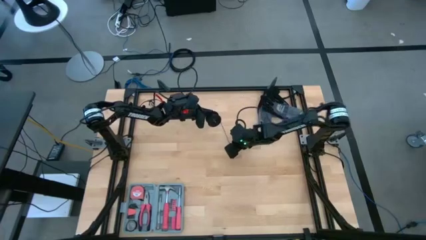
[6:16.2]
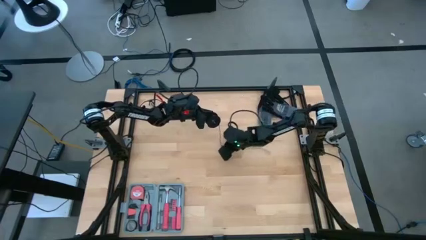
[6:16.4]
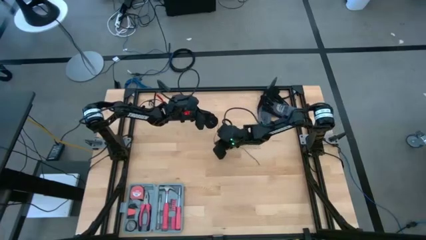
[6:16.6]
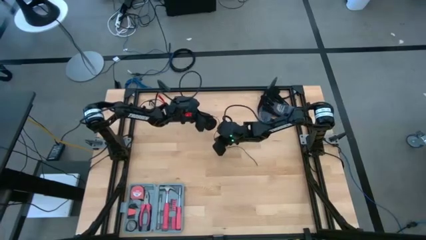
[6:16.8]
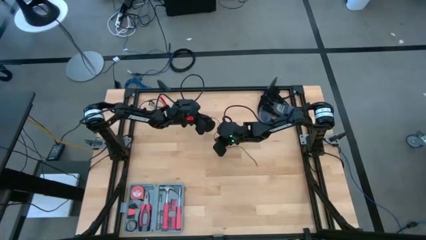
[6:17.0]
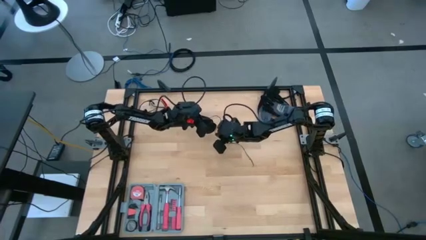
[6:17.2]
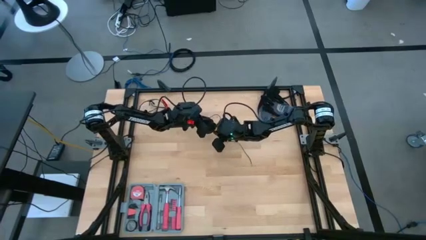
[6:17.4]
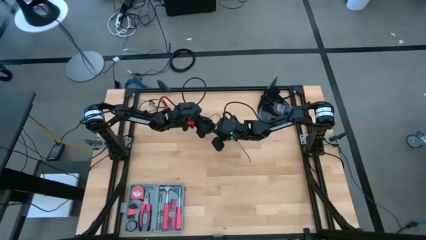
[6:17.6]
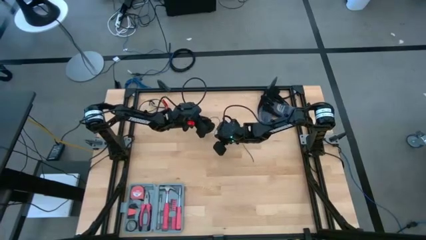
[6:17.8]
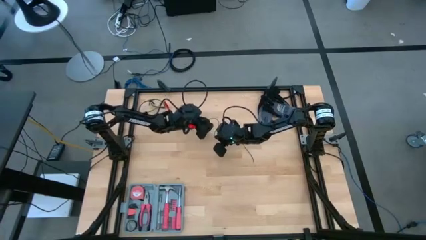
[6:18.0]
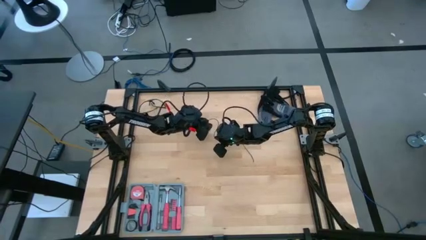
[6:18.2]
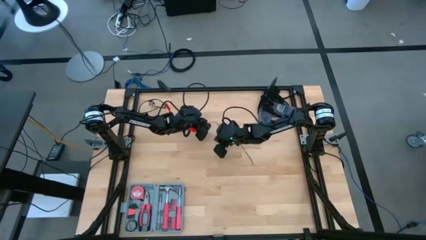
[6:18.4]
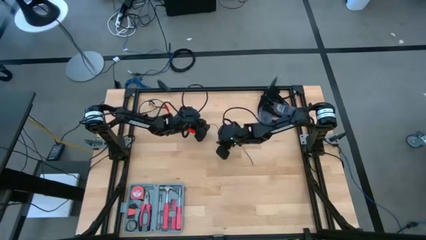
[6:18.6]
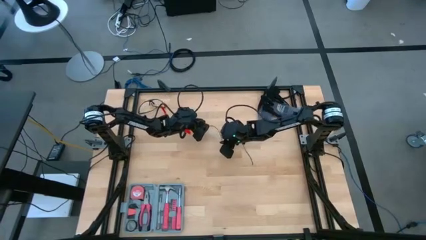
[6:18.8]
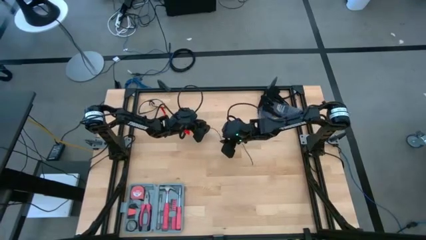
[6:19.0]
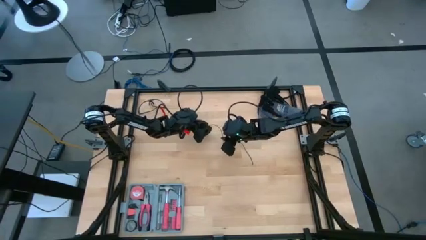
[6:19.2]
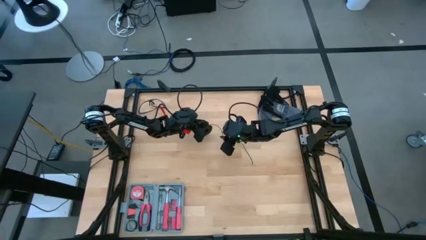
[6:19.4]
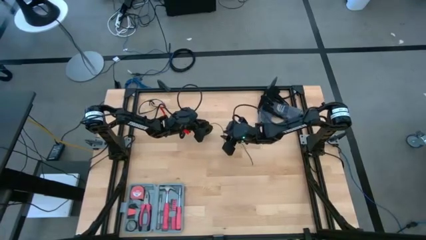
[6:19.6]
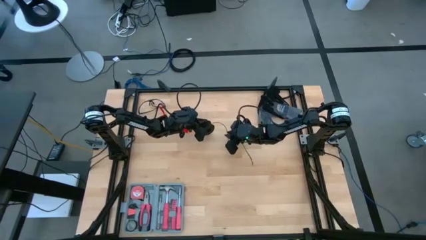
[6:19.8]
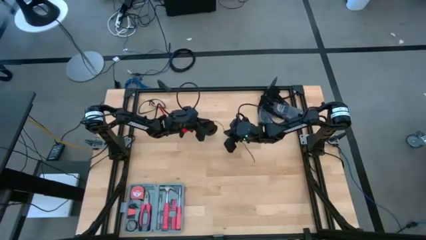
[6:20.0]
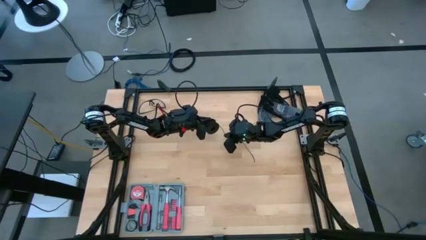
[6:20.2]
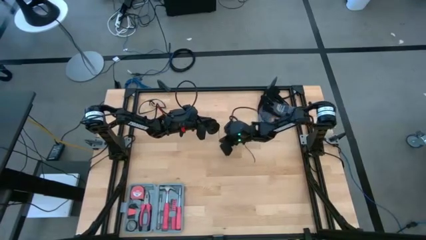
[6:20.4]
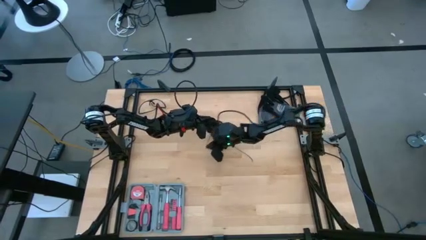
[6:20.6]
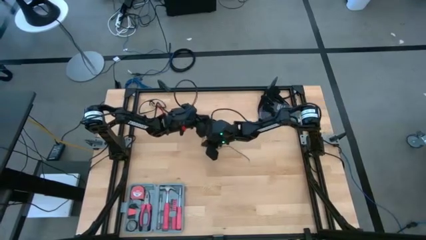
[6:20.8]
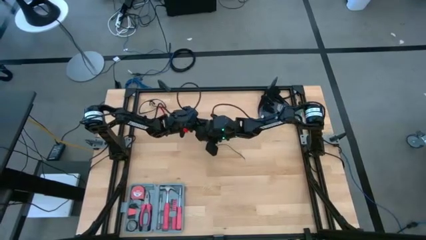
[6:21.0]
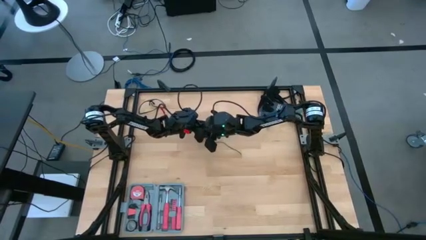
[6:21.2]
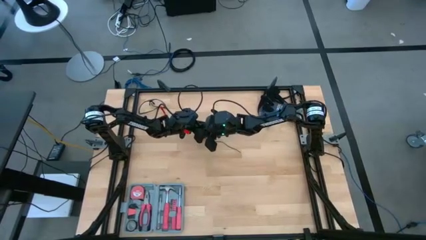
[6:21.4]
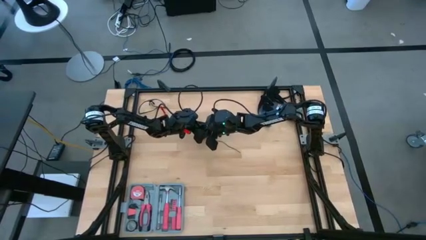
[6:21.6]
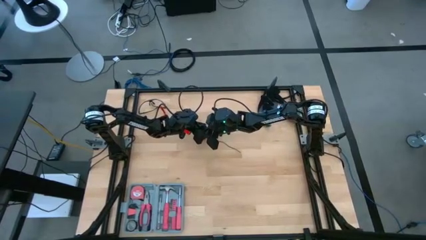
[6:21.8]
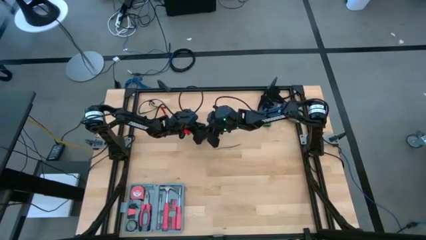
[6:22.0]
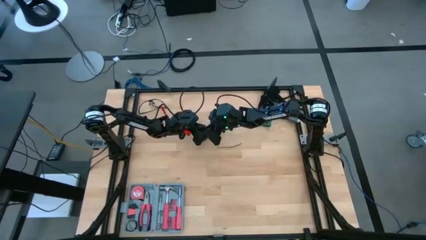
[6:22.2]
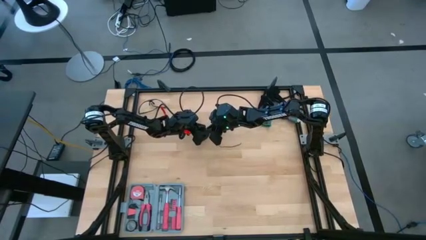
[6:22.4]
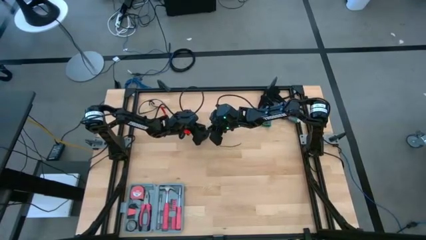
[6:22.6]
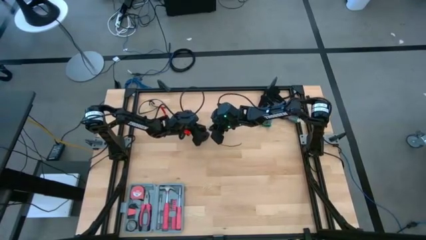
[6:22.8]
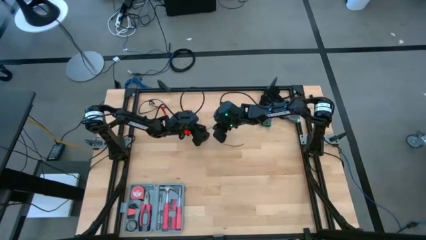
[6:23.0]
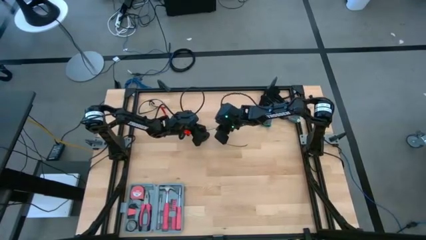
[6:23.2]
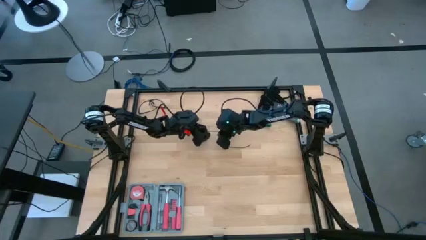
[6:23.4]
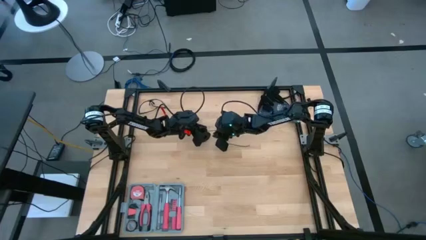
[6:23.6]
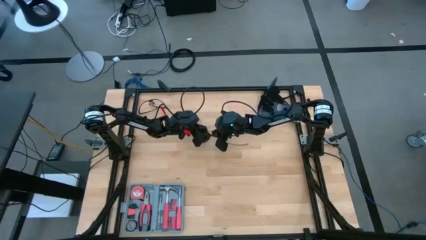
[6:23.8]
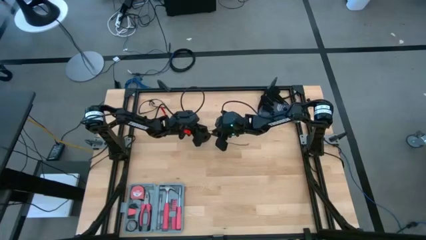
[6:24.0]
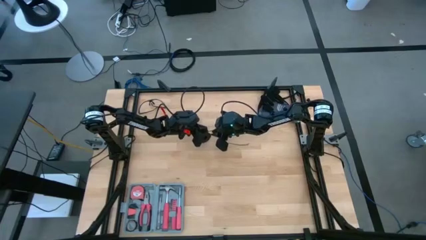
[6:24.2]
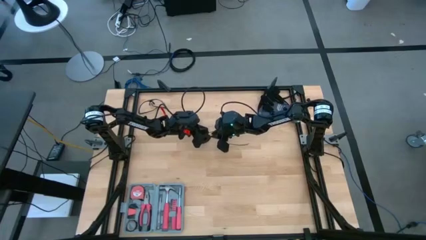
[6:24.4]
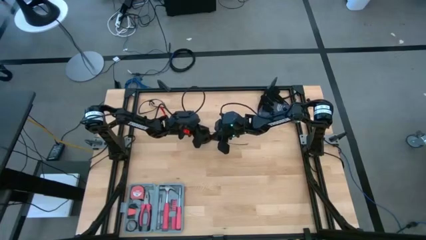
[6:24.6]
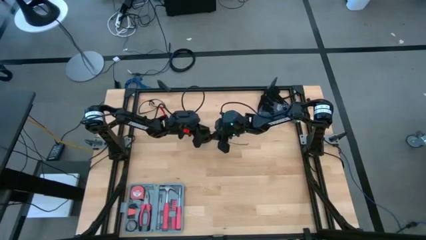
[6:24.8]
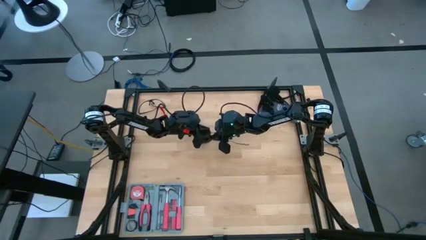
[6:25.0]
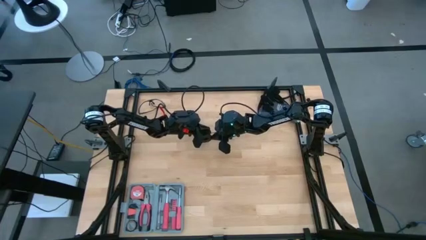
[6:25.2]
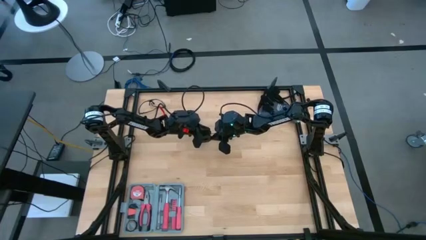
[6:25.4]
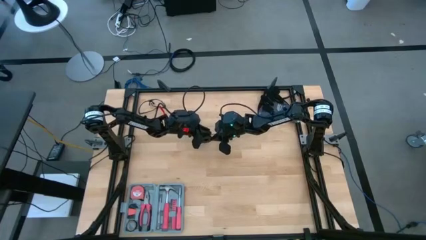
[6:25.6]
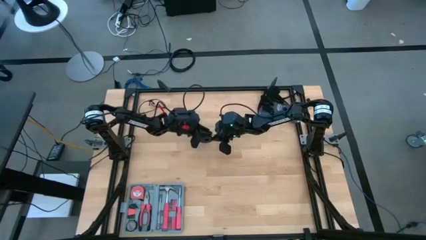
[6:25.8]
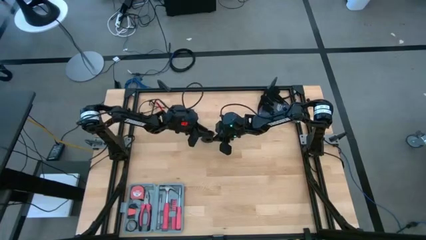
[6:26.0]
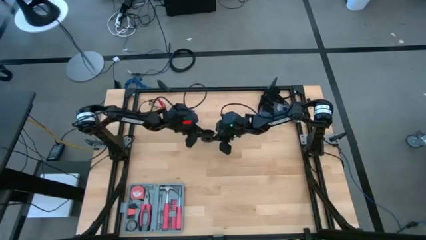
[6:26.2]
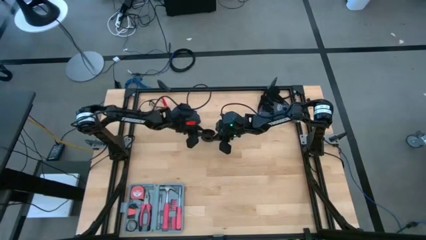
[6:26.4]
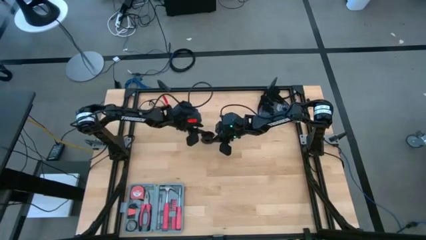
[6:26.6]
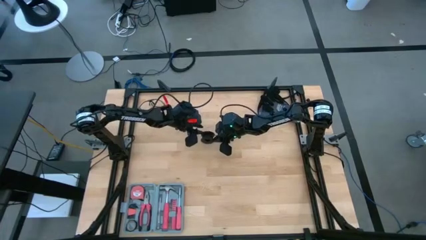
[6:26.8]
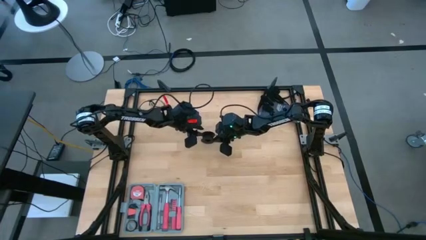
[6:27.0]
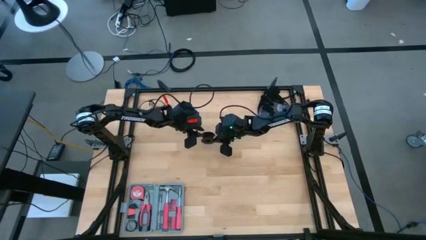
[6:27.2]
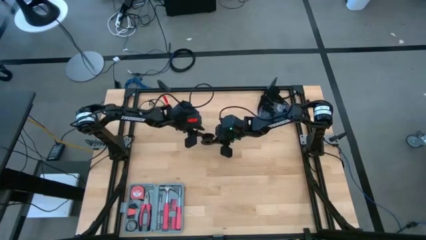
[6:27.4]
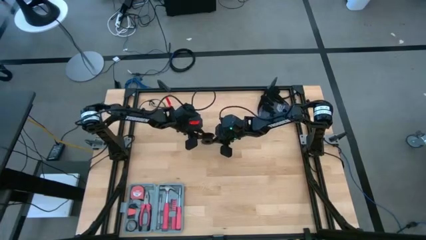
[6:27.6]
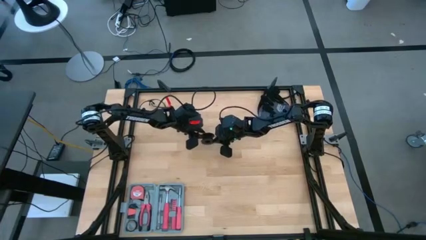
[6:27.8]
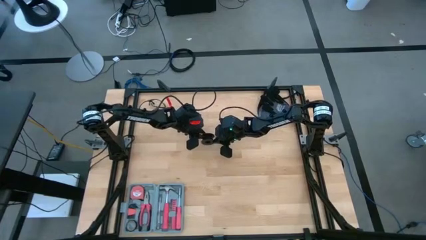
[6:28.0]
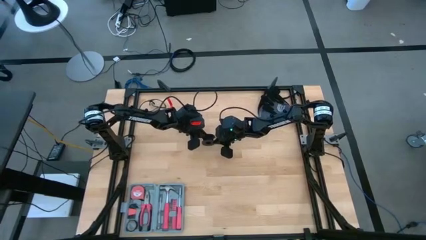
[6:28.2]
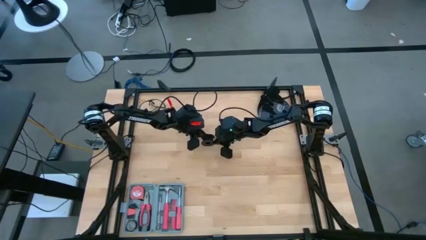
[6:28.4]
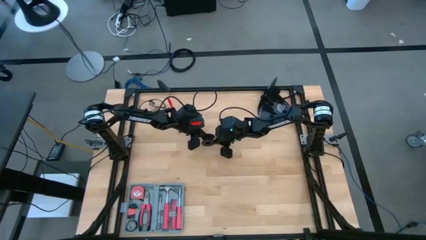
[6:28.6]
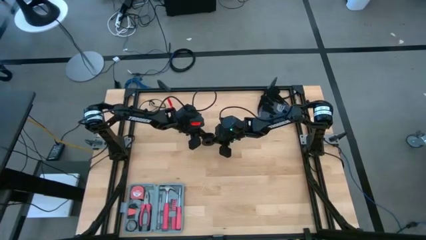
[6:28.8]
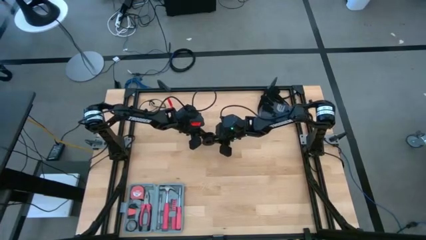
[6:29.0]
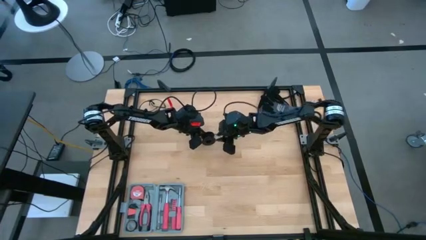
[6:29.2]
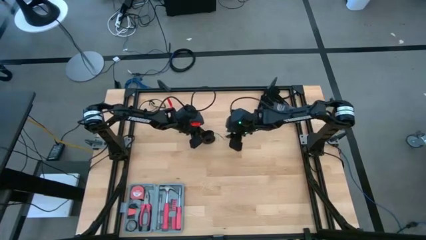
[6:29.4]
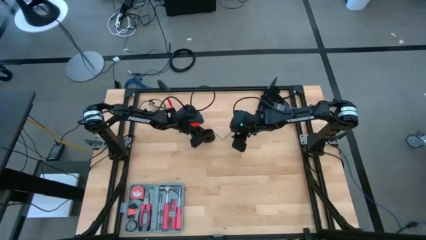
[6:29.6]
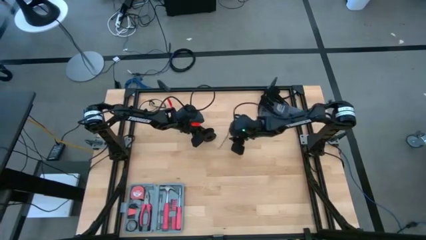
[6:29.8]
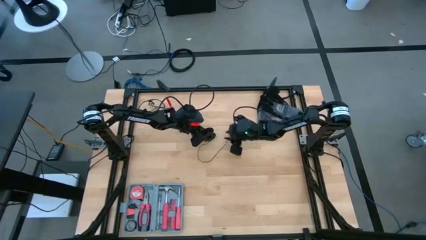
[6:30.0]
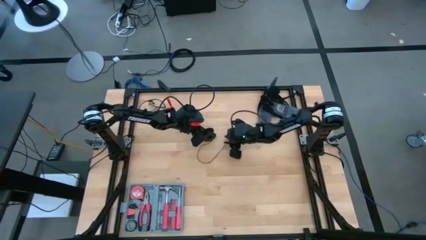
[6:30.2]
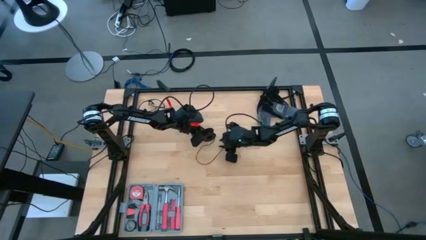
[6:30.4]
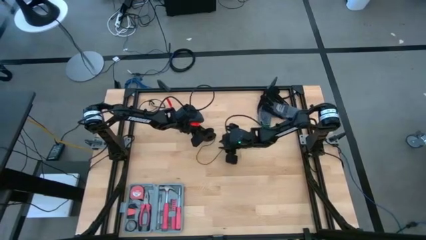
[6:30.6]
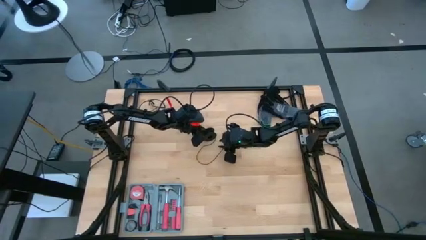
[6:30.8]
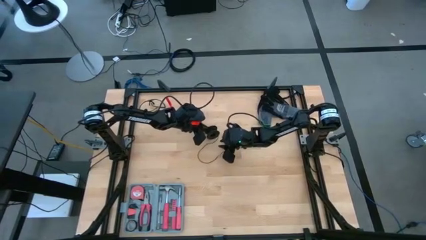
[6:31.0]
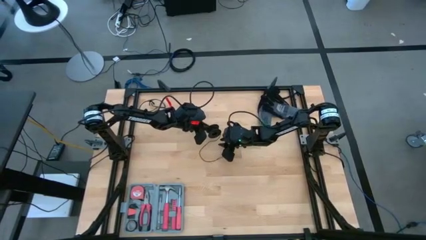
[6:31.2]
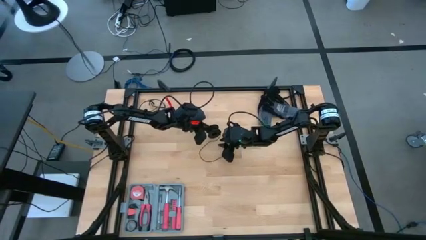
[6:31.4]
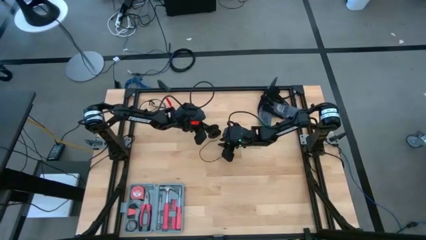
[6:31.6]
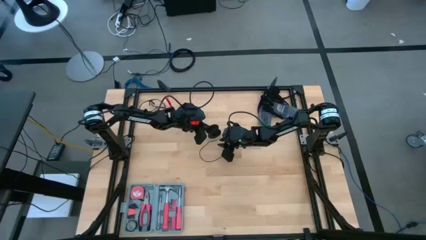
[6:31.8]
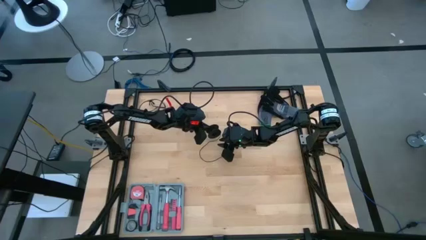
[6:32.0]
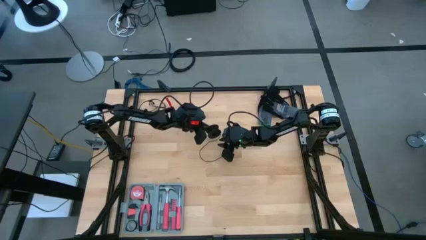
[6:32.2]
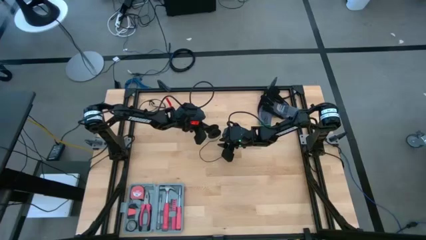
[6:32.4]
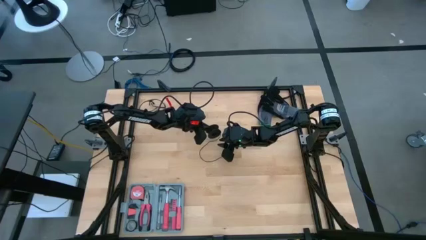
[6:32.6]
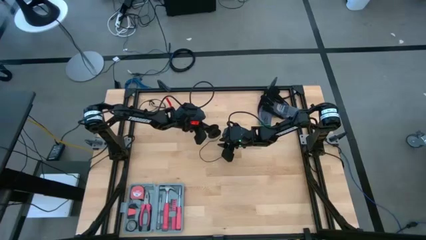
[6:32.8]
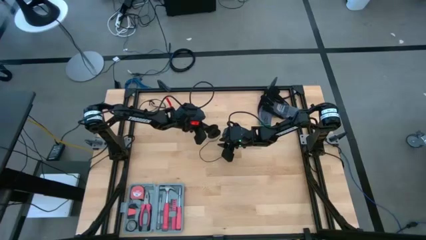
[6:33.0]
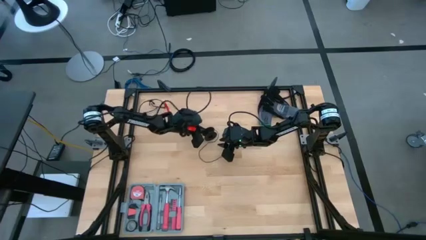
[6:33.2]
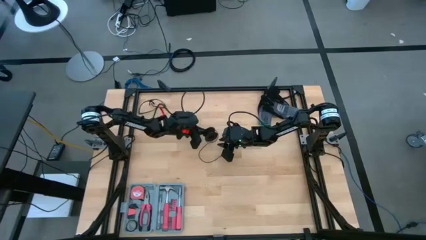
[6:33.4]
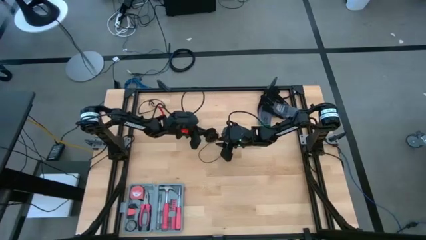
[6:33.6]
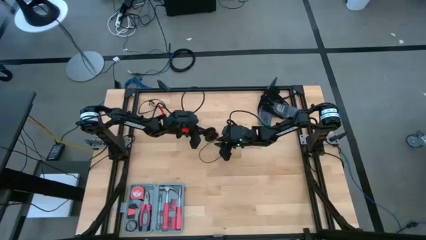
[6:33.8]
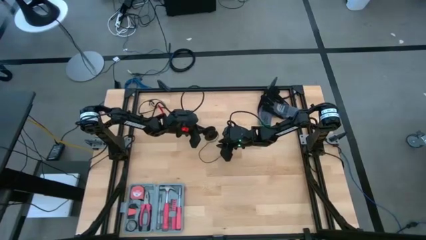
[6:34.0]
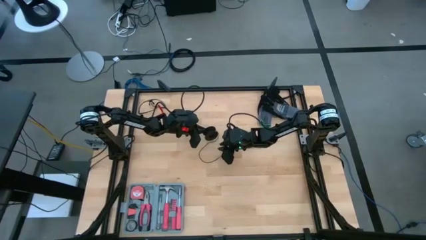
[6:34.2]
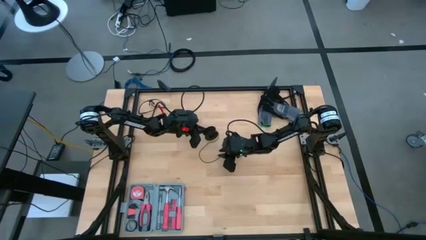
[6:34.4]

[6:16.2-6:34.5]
Task: Coil cords
Coil the black wire onto the black spool
